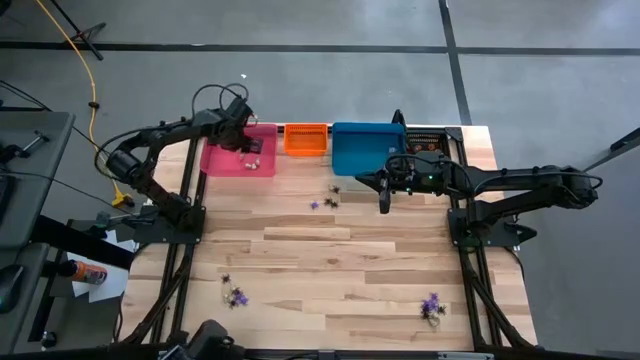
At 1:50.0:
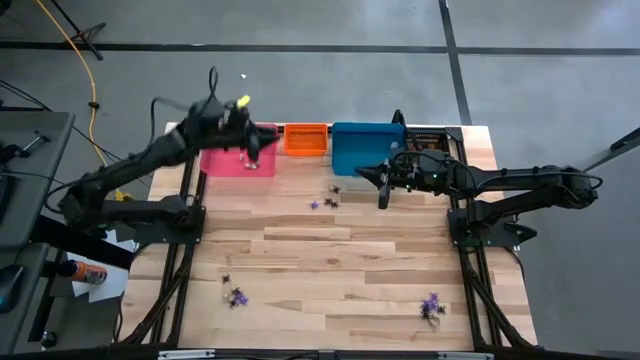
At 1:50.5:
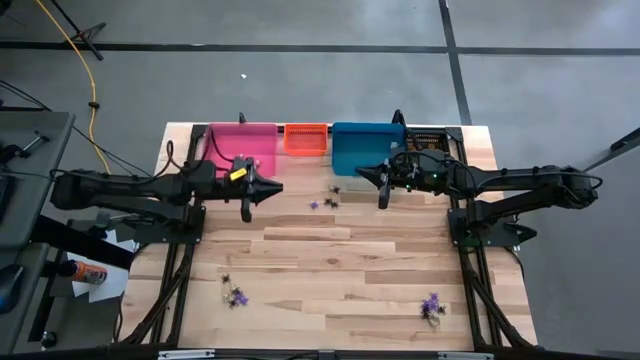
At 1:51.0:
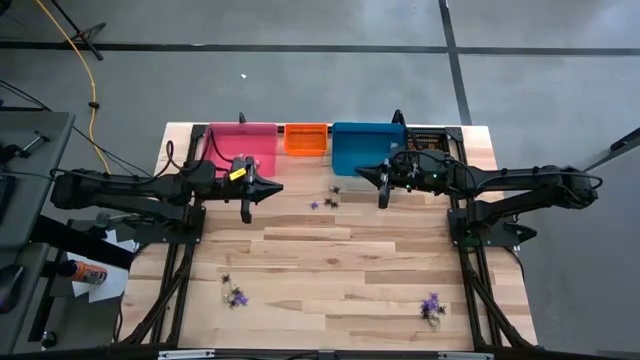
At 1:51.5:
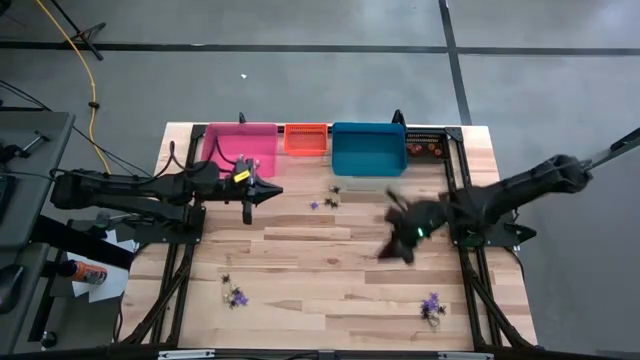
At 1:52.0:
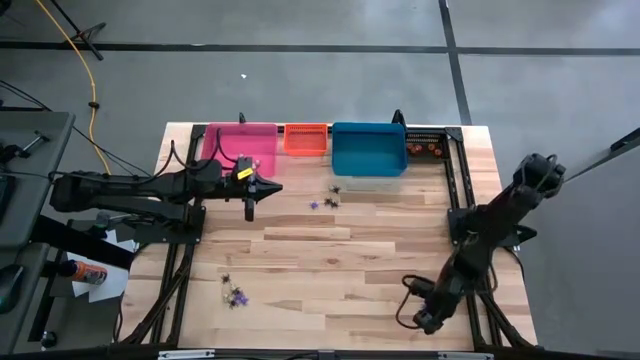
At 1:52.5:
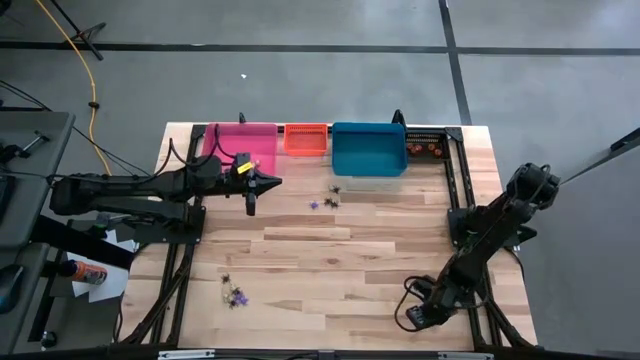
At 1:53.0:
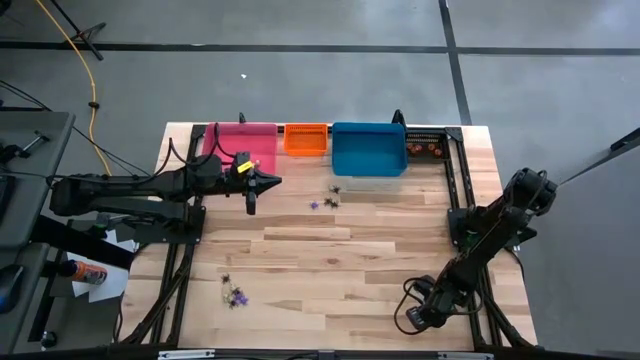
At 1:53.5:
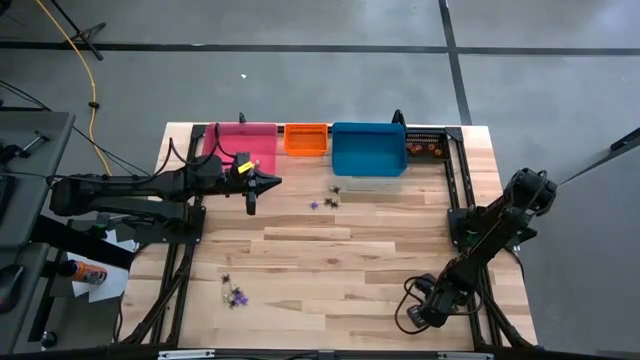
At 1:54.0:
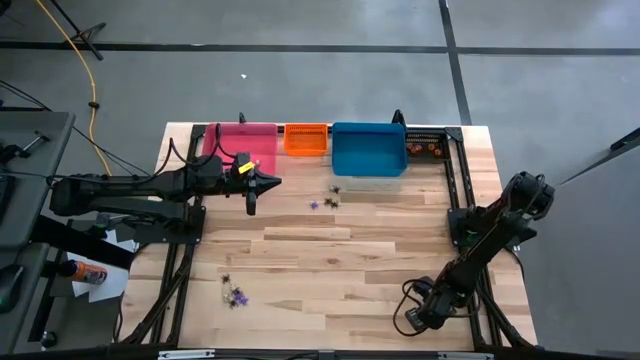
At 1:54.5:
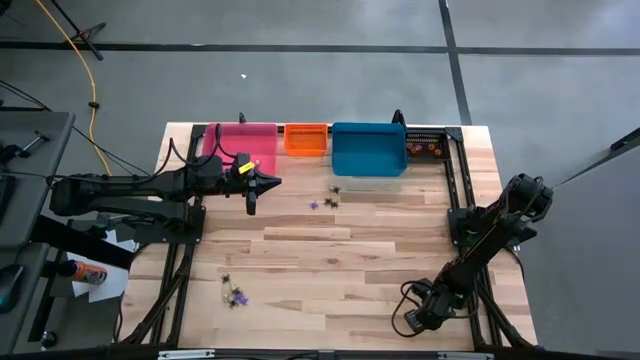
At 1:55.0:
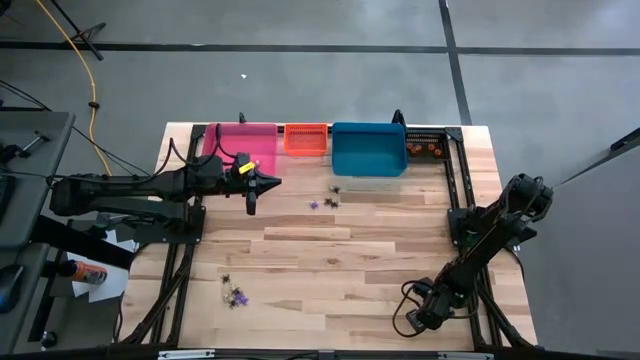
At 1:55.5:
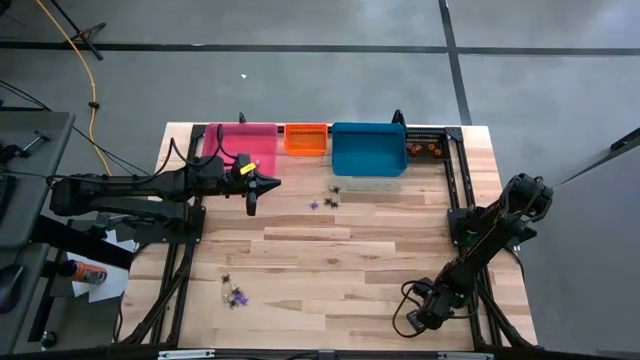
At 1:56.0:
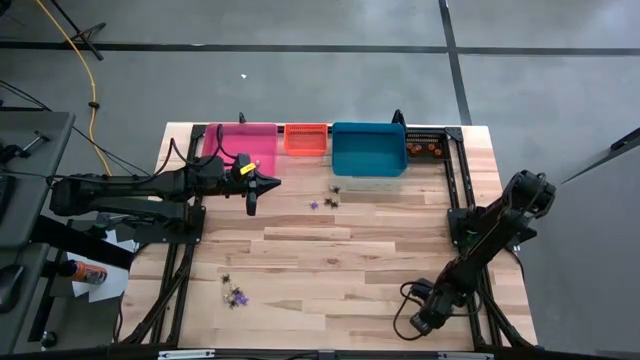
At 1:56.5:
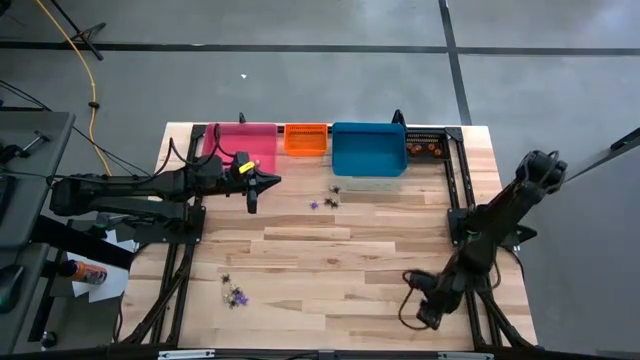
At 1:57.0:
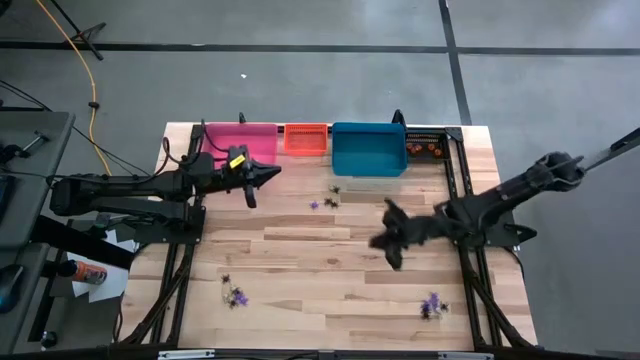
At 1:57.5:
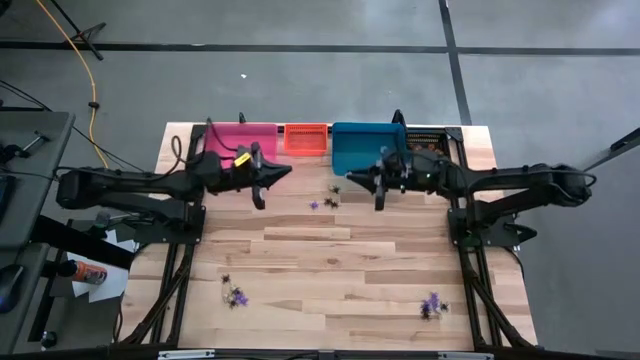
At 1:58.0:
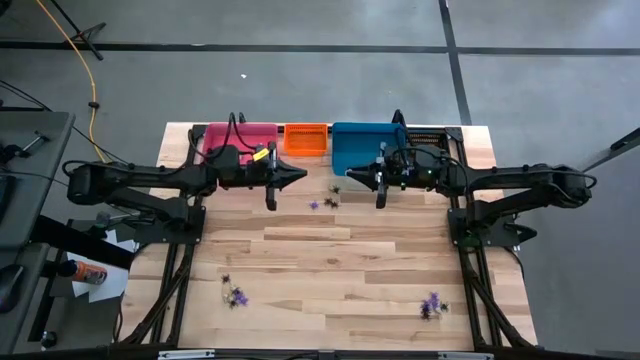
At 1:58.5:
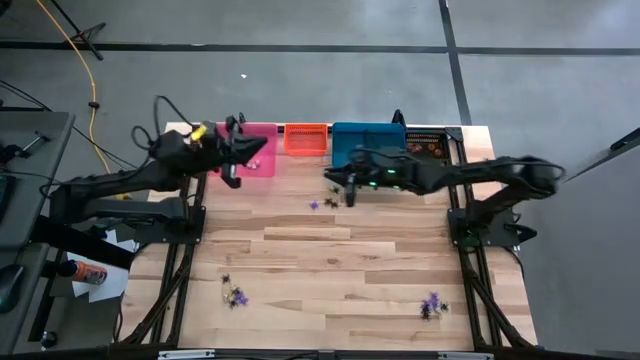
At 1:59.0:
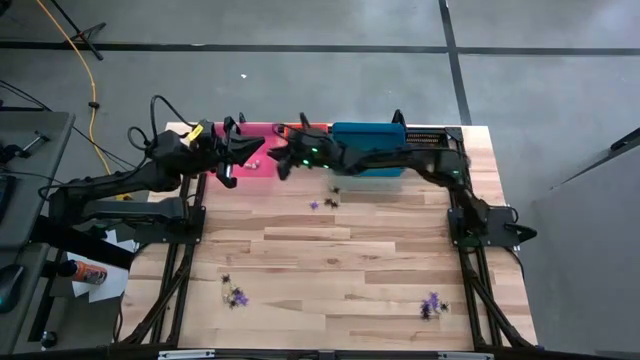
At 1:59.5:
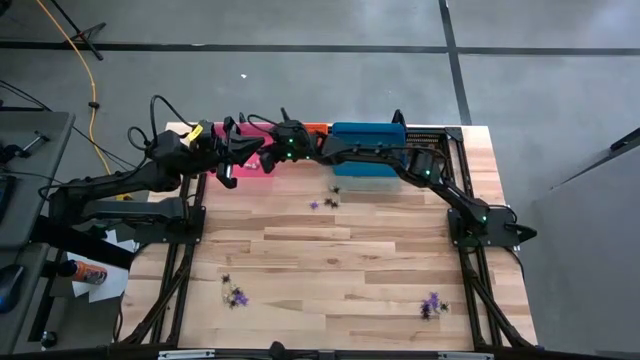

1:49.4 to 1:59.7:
Task: Sort Halloween decoration
Put the white skull toy into the pink bin

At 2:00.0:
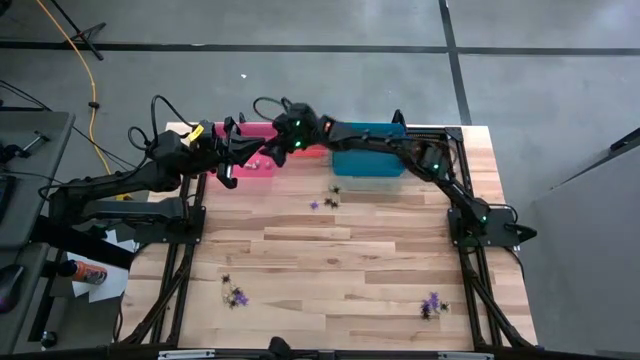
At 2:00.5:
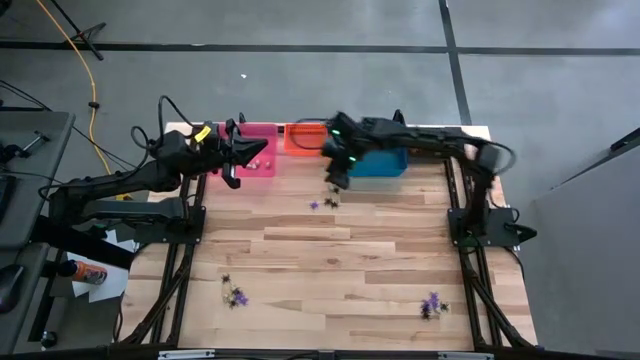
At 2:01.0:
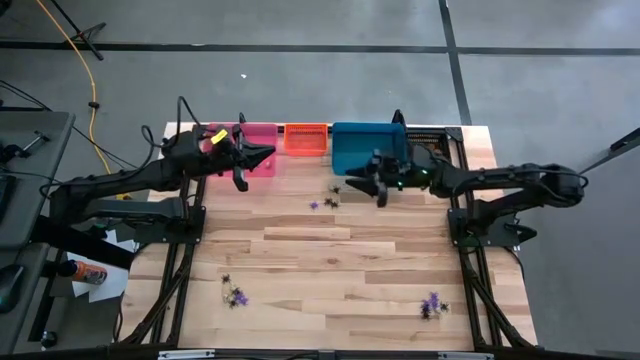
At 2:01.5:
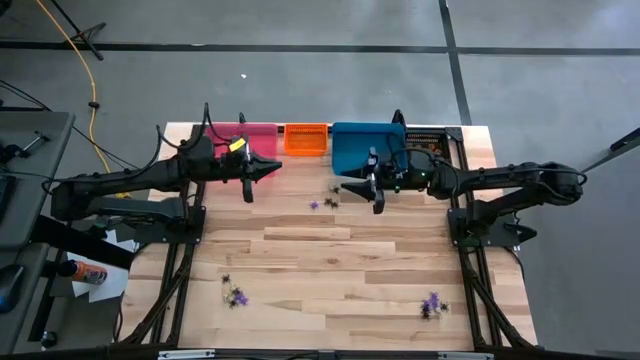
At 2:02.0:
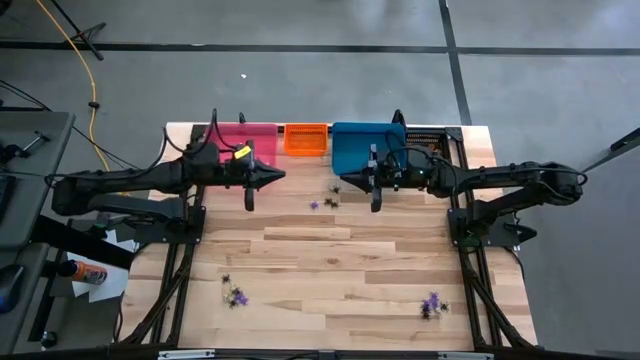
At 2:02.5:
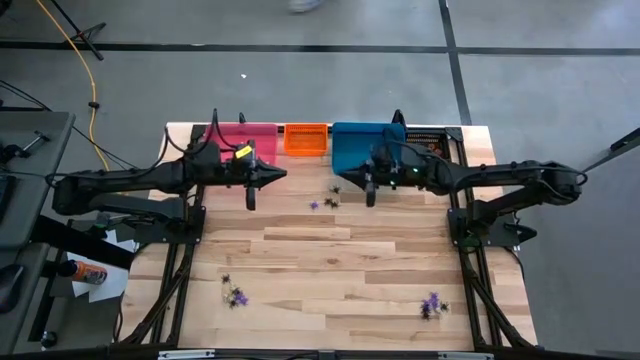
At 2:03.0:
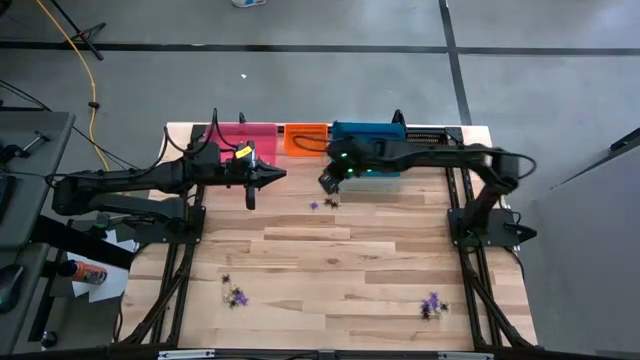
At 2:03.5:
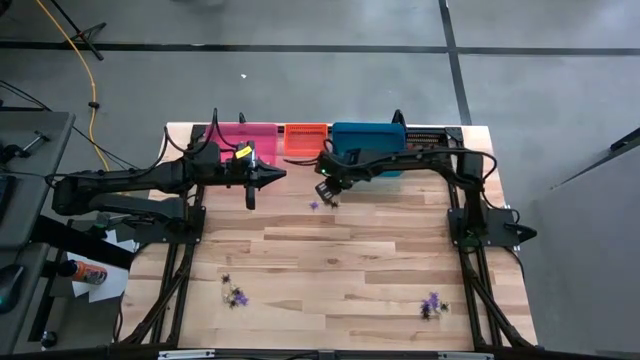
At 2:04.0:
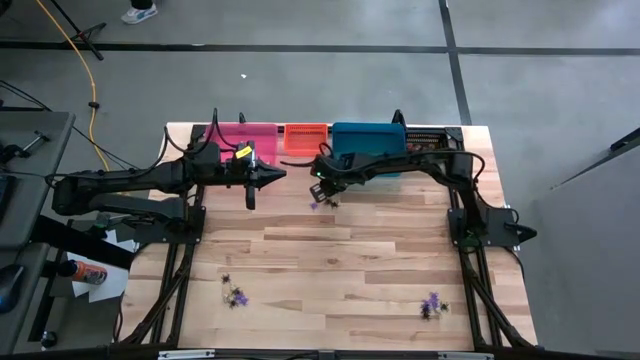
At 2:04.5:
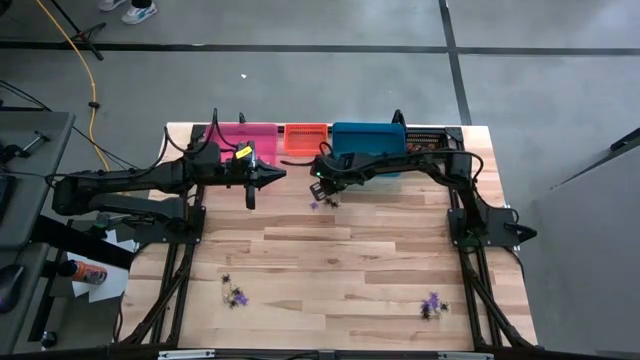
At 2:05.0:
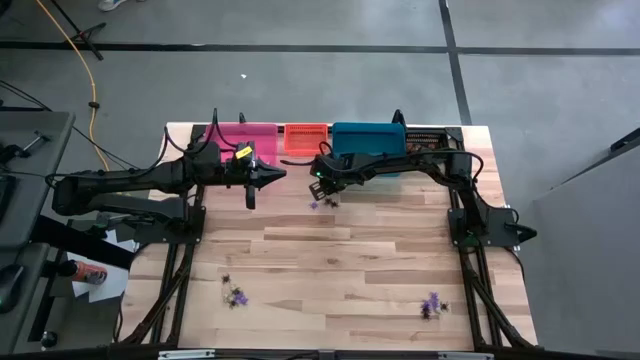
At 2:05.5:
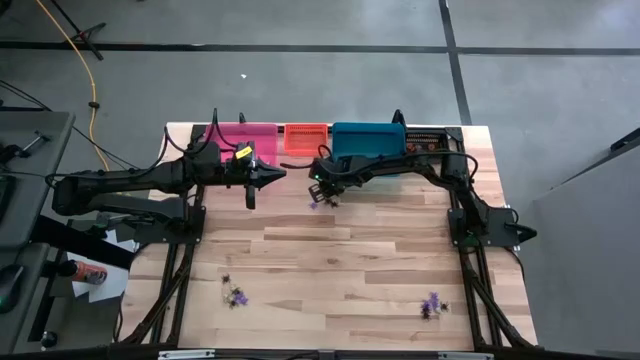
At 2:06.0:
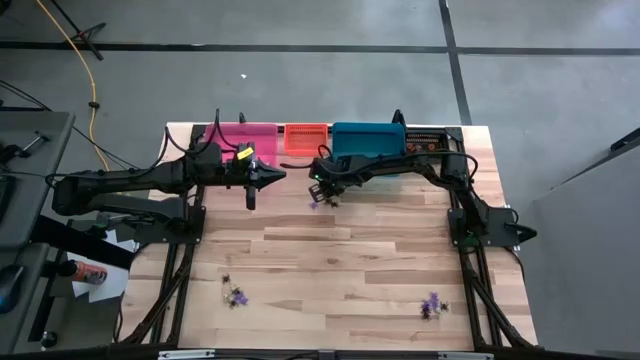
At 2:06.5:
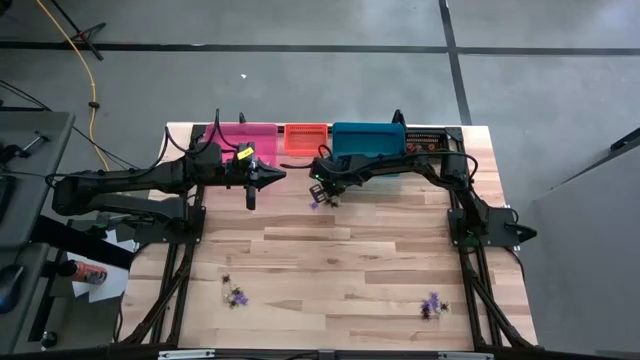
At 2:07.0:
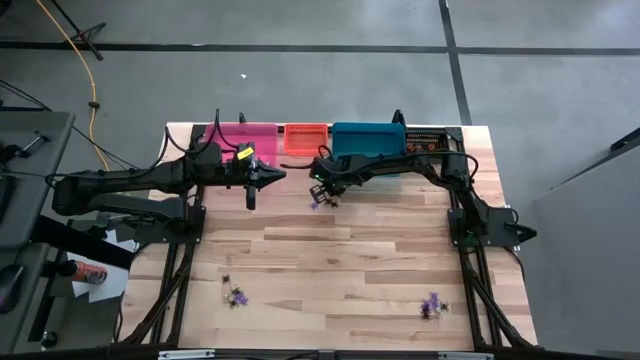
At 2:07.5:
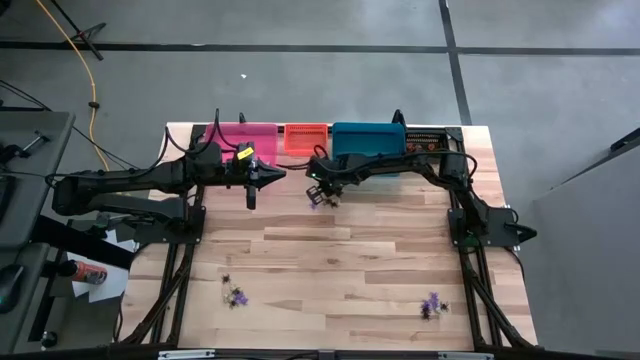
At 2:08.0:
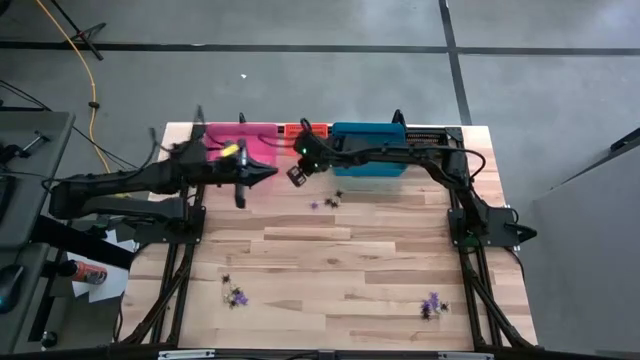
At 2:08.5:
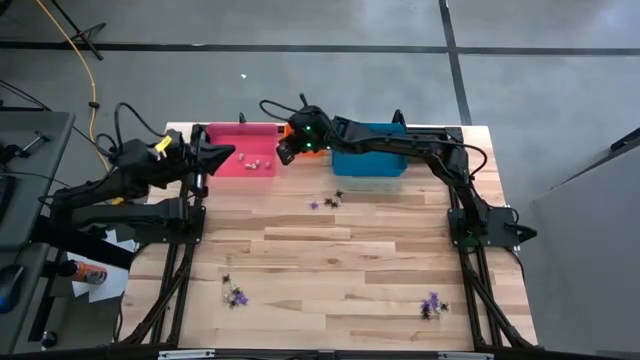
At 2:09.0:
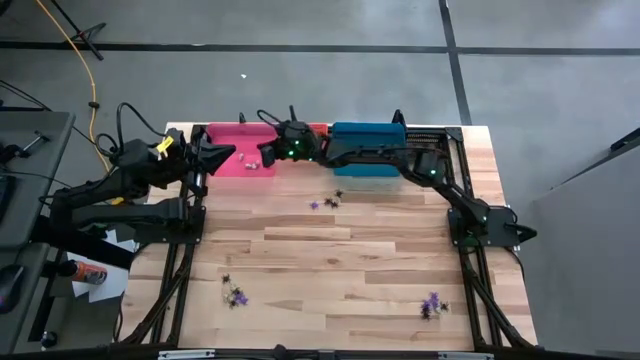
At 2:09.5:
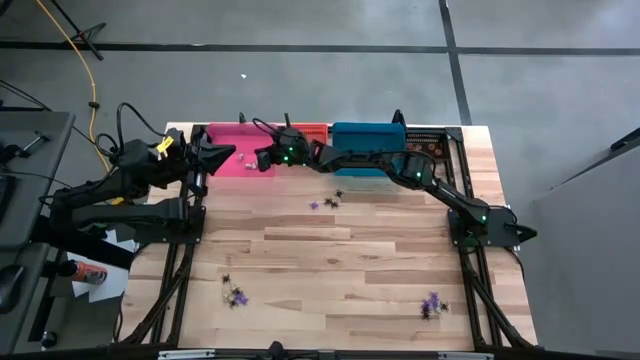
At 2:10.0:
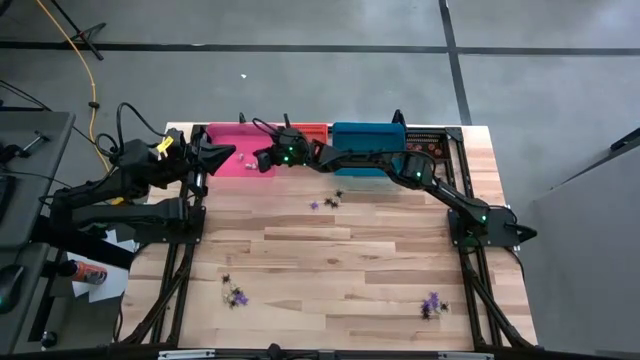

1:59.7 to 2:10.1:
Put the white skull toy into the pink bin
